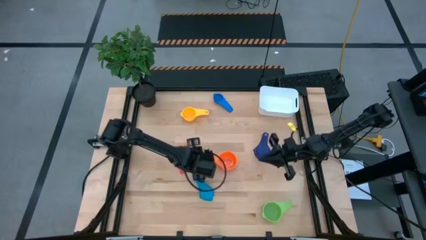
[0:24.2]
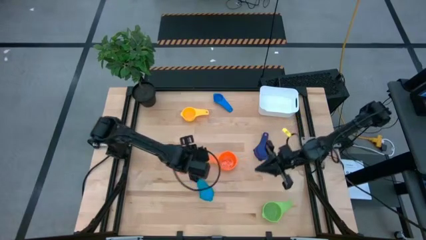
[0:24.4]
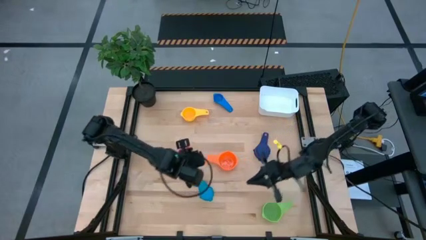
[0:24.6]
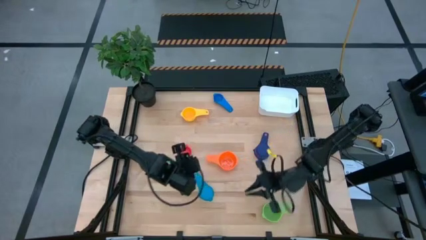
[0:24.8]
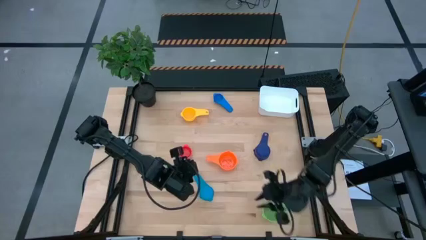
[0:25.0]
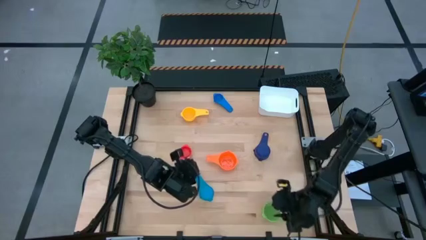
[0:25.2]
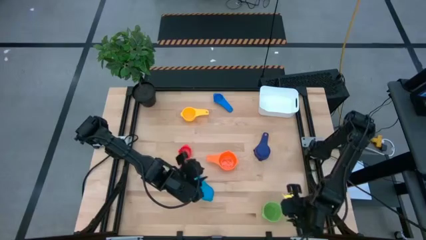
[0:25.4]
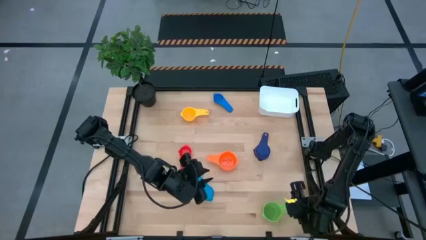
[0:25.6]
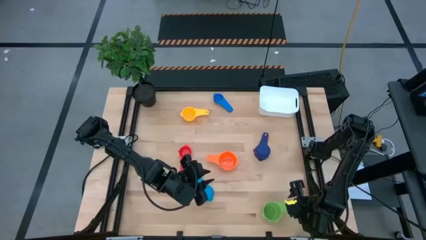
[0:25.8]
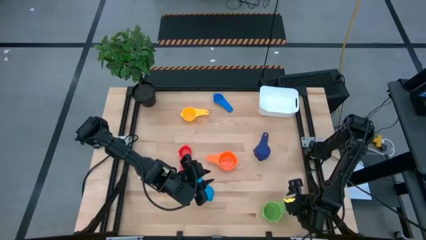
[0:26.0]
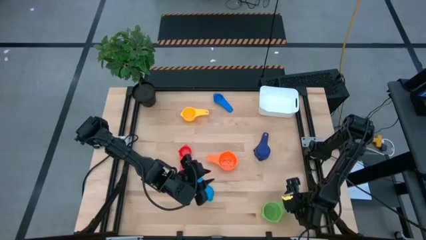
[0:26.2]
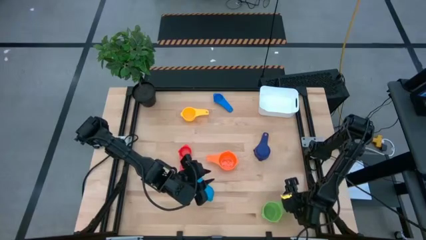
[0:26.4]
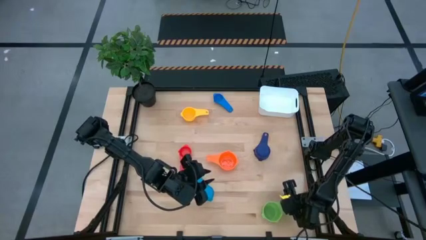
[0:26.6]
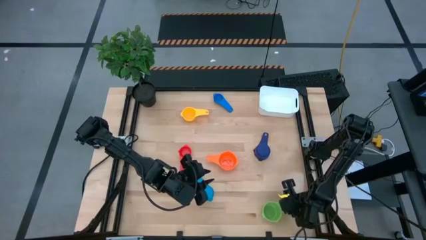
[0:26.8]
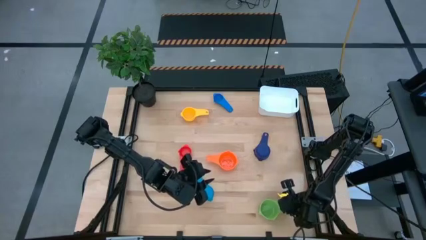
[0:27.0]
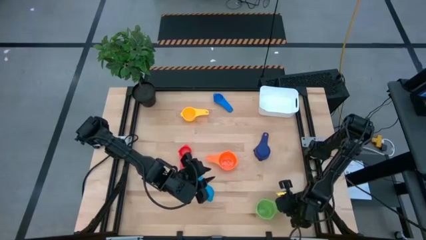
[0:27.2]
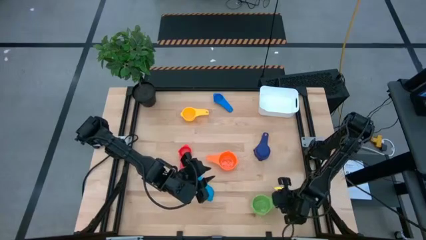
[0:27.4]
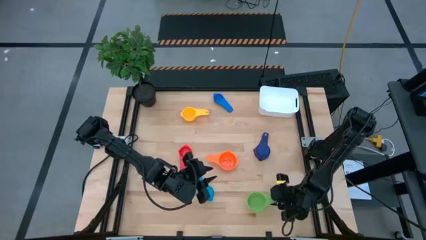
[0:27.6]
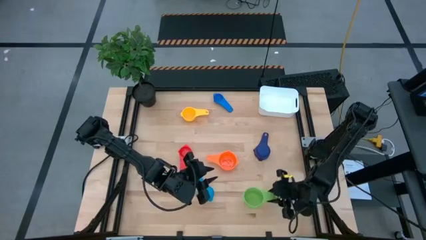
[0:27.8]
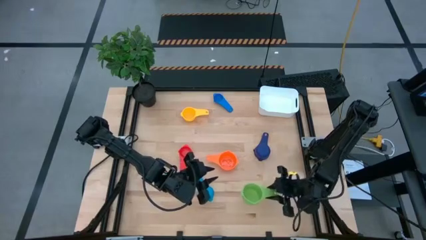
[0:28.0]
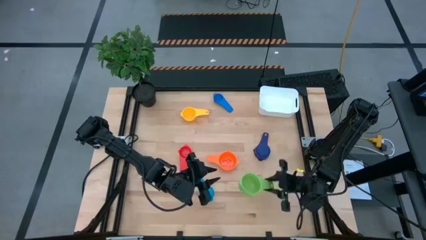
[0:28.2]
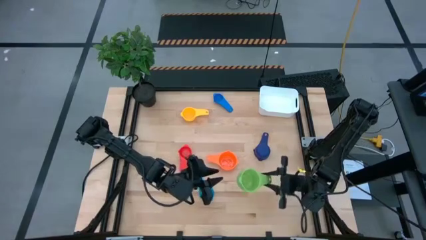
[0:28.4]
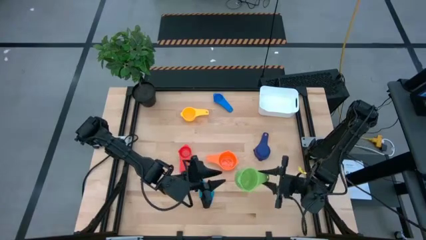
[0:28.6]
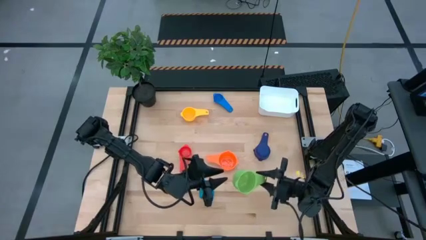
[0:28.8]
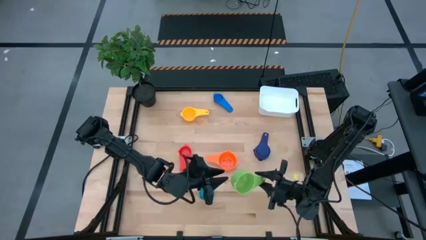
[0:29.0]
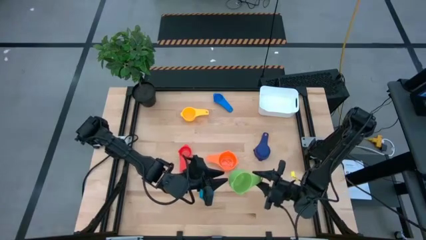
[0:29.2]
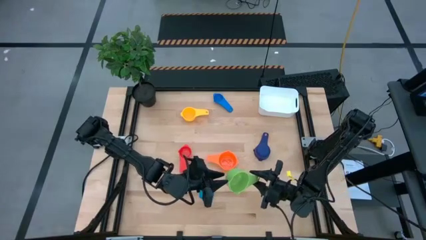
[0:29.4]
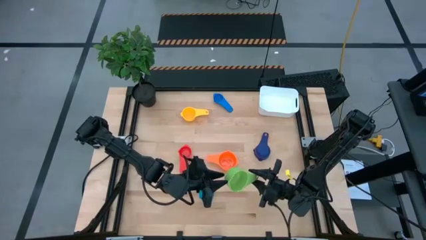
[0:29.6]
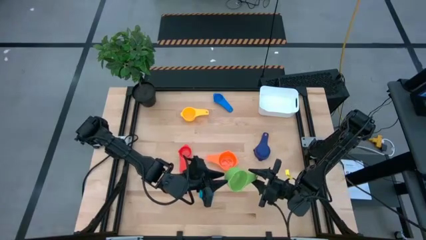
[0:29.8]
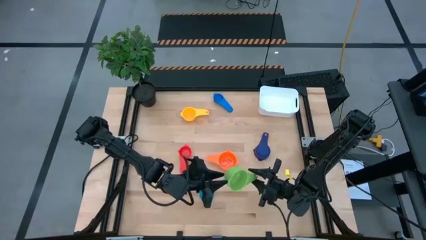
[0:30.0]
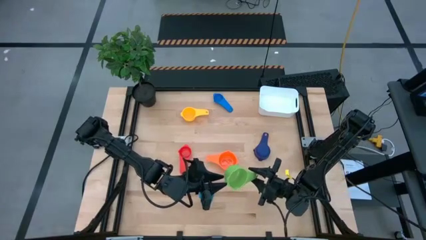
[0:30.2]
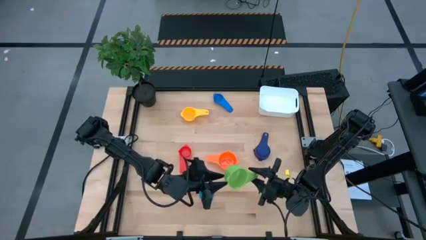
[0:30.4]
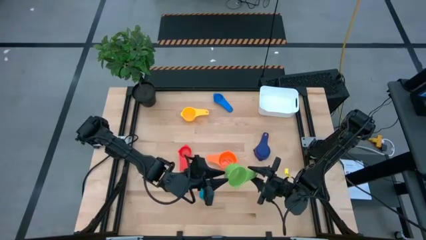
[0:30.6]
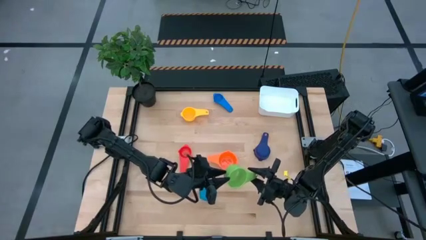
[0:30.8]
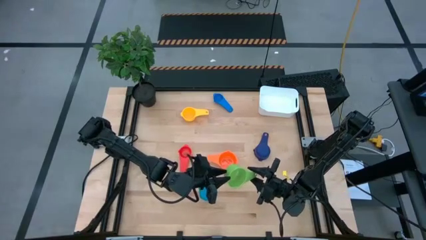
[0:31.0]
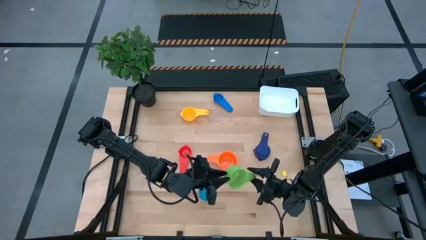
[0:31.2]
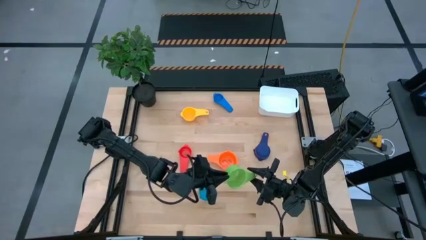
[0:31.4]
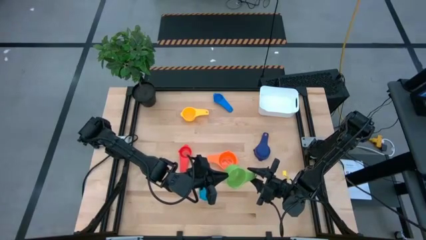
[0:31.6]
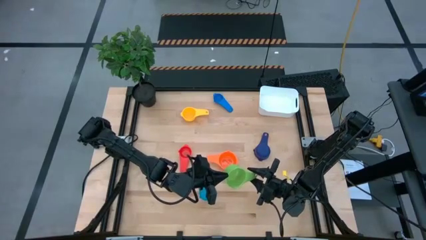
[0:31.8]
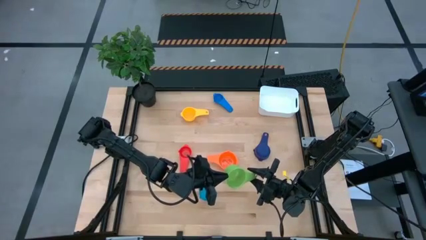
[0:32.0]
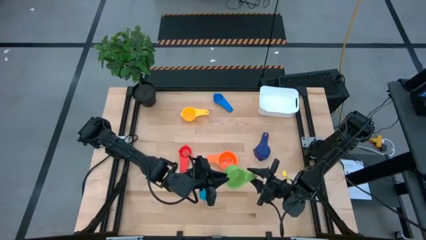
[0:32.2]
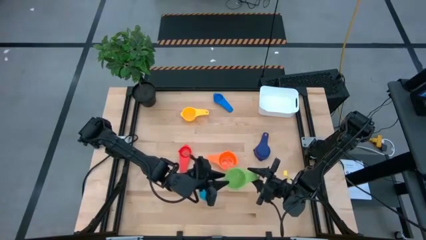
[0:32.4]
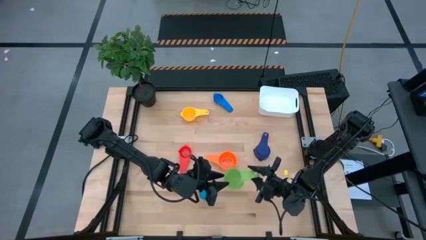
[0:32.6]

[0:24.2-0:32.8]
Task: Nest measuring cups in basket
Stack the green measuring cup on top of the orange measuring cup

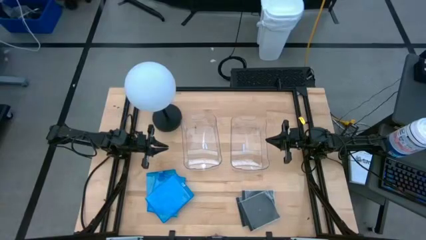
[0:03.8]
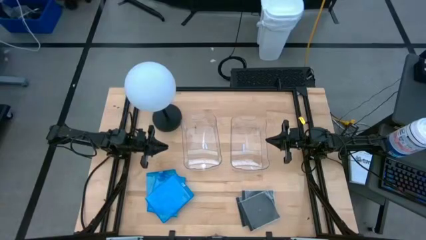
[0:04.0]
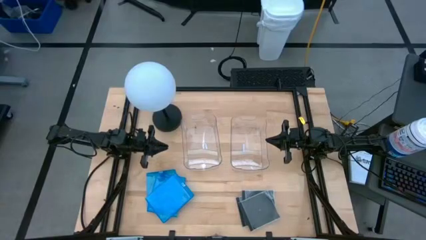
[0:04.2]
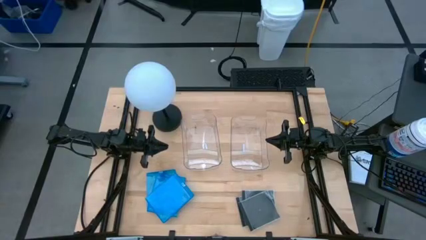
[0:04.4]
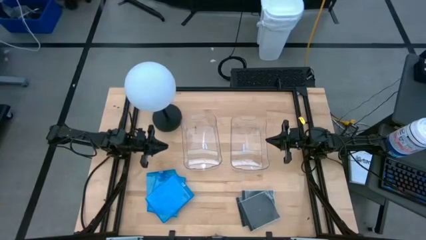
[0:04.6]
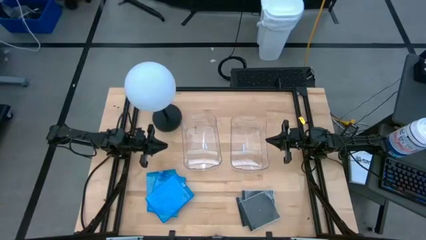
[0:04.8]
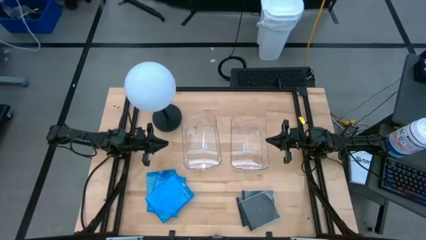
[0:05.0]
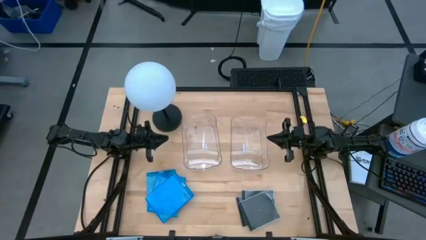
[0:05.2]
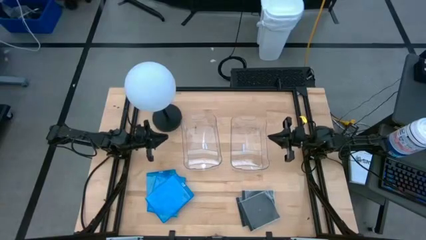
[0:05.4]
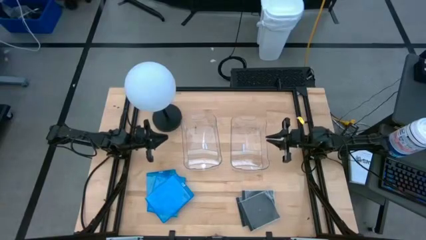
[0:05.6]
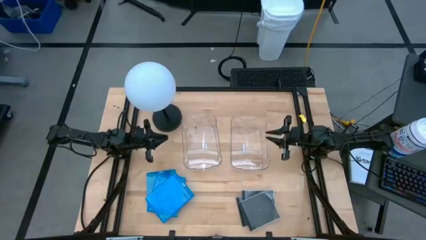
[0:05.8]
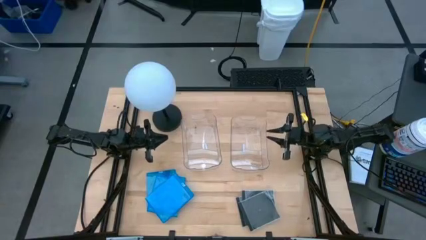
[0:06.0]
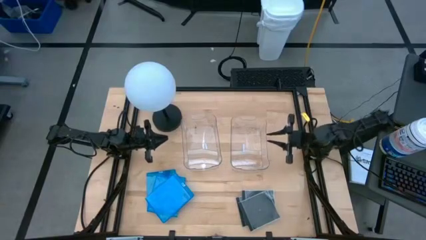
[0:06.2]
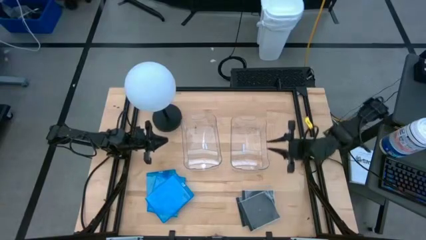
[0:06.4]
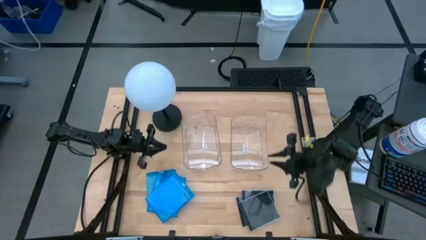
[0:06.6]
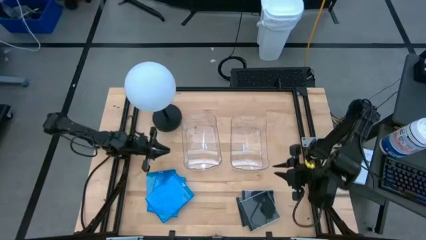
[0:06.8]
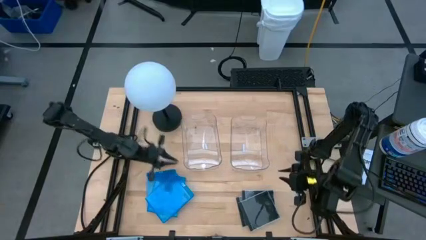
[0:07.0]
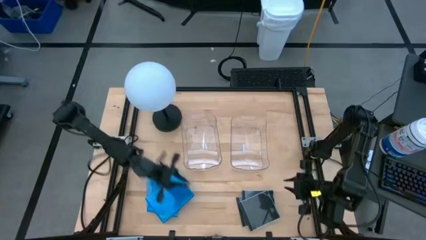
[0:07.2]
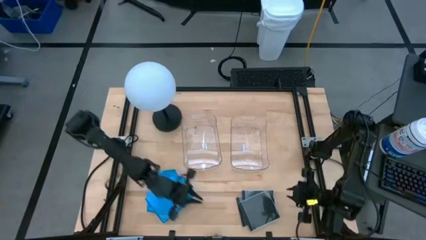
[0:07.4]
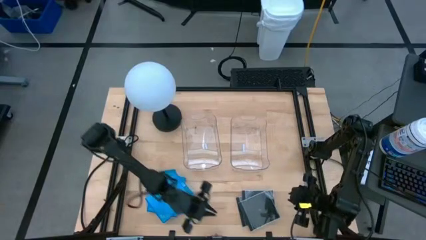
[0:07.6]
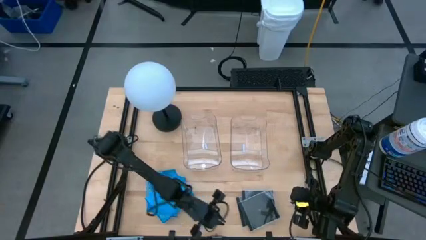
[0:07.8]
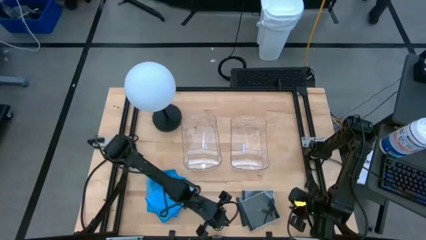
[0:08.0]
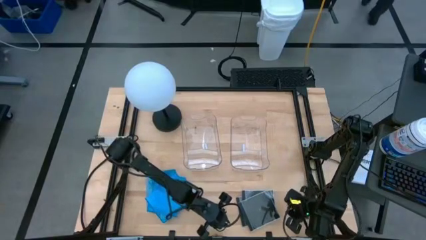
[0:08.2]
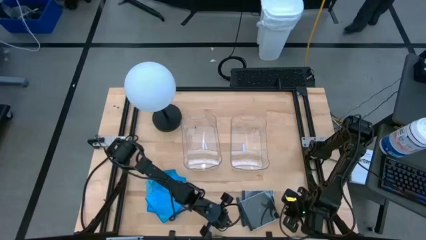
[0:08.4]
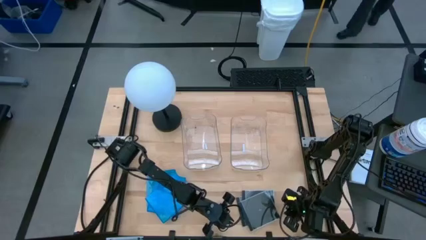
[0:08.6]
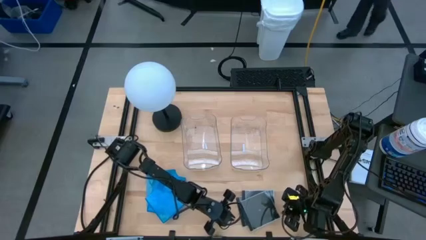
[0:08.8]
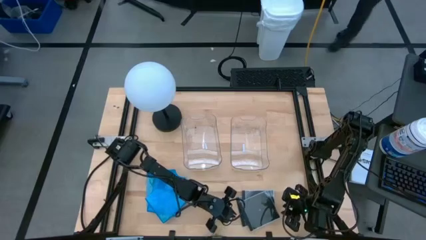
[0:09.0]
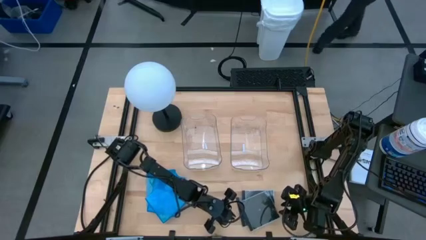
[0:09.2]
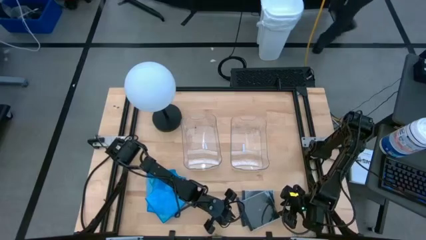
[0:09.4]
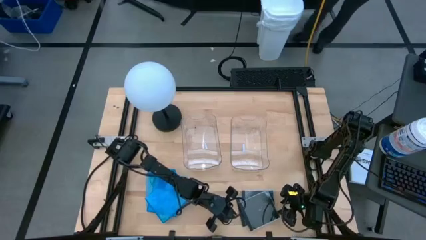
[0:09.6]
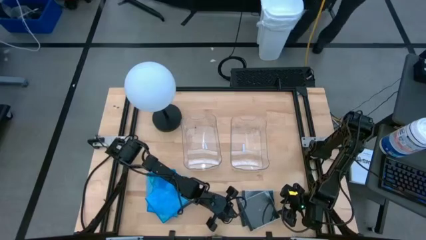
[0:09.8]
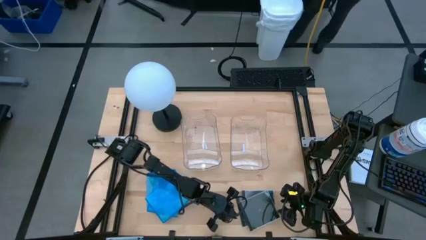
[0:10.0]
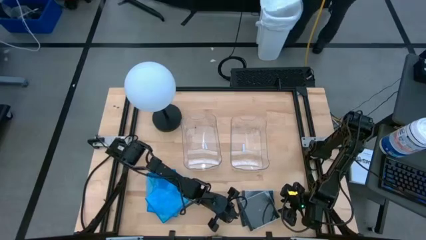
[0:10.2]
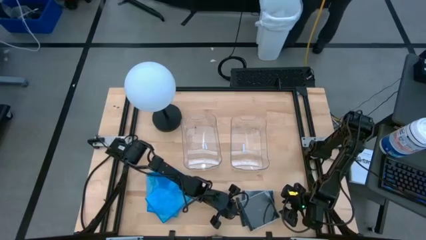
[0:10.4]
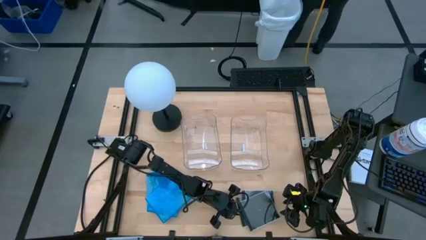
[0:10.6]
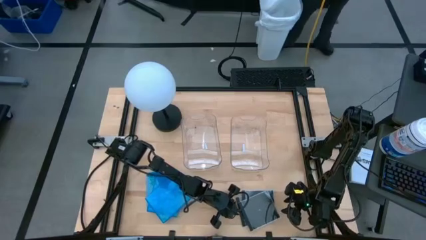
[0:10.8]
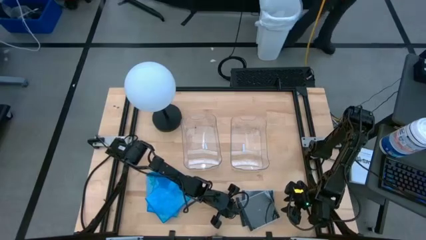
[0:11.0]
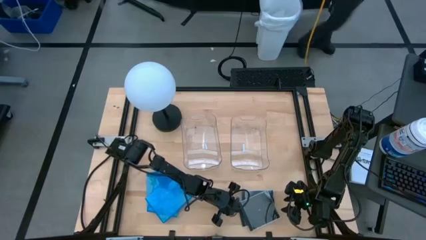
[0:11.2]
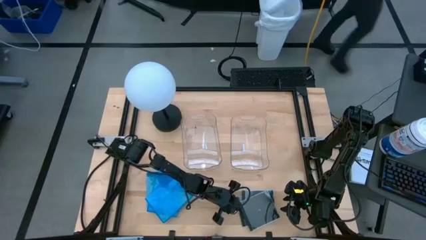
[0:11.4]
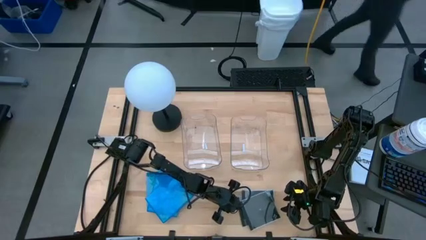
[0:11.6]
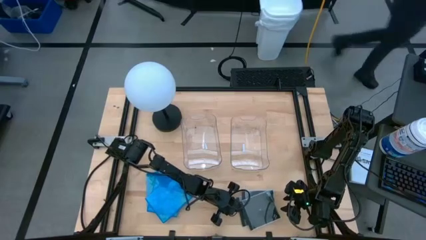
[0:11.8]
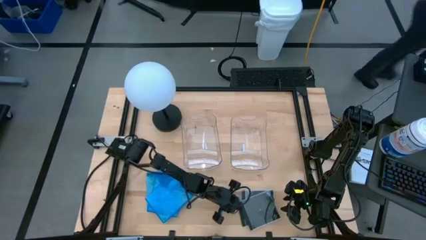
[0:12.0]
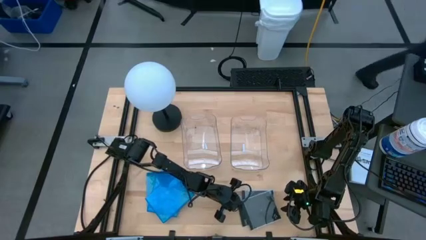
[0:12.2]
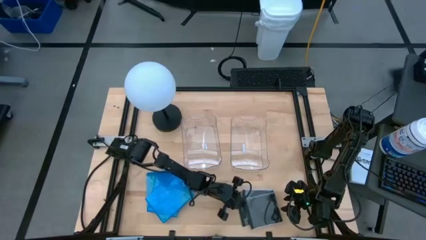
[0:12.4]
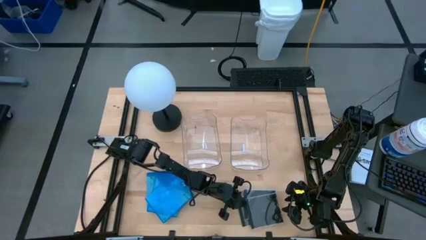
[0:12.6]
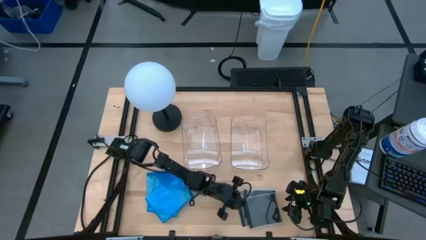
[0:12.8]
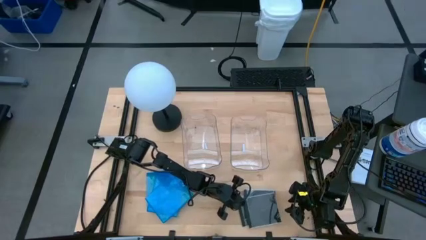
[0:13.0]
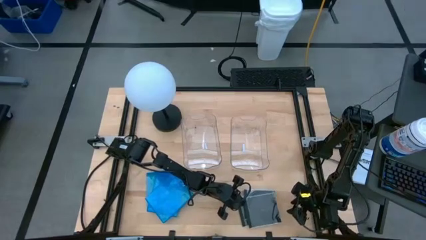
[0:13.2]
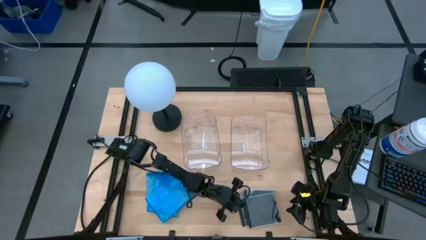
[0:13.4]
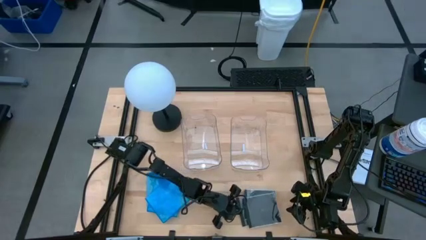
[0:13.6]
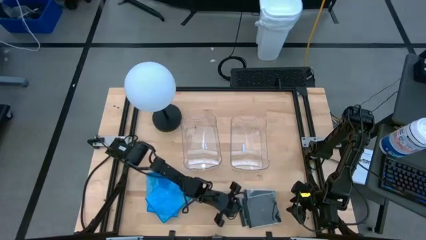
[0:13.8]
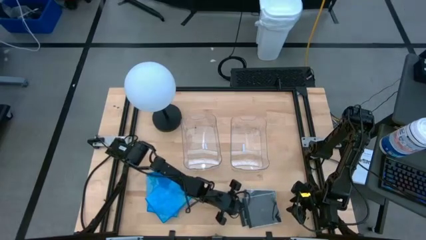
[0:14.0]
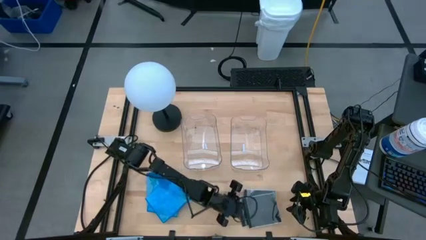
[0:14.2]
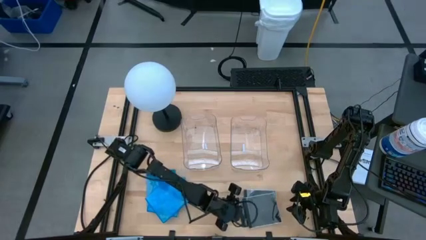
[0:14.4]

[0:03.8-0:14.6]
Task: Pick & place jewel cases by type
Put the black CD case into the right transparent bin
